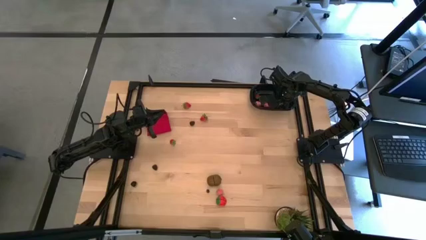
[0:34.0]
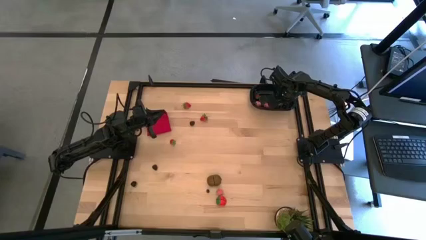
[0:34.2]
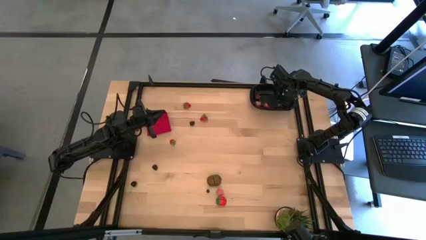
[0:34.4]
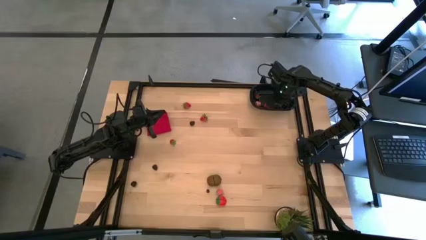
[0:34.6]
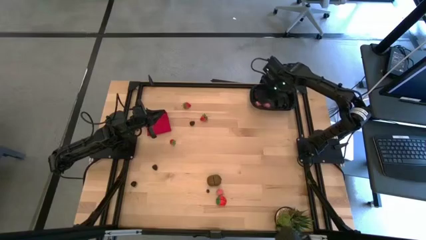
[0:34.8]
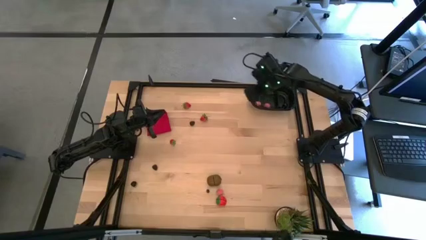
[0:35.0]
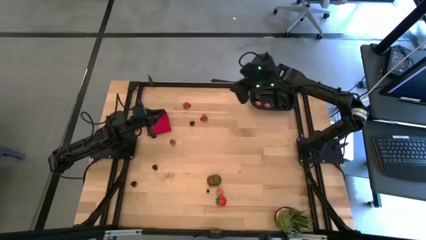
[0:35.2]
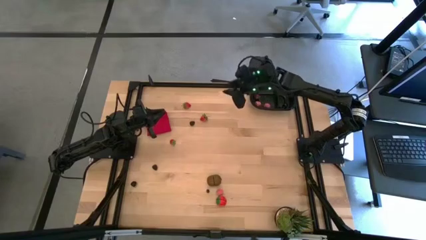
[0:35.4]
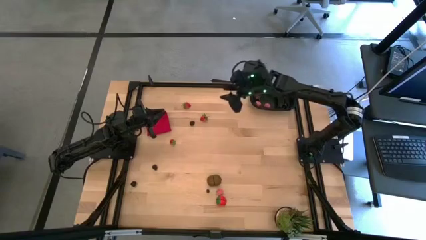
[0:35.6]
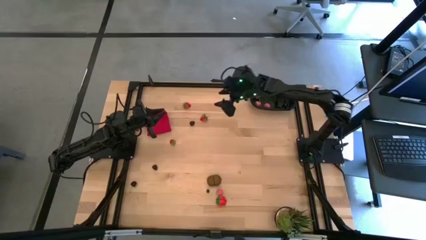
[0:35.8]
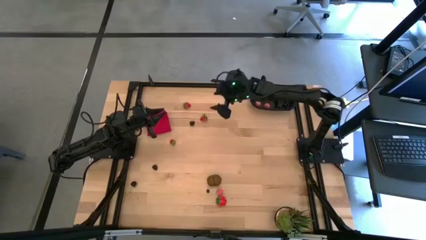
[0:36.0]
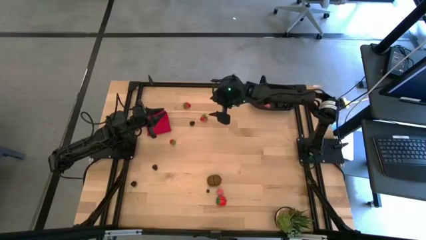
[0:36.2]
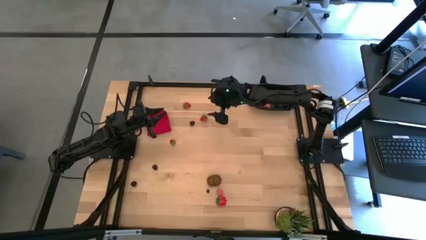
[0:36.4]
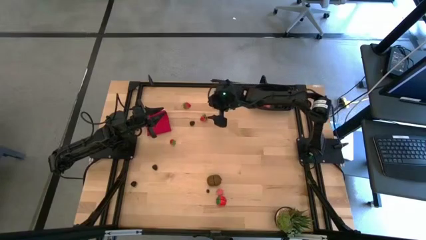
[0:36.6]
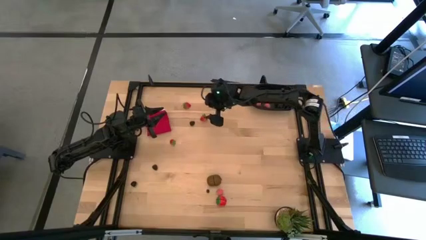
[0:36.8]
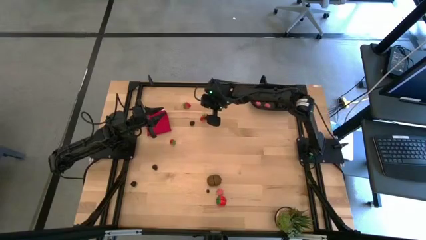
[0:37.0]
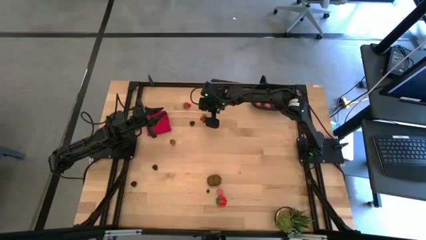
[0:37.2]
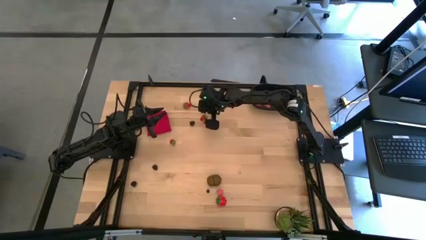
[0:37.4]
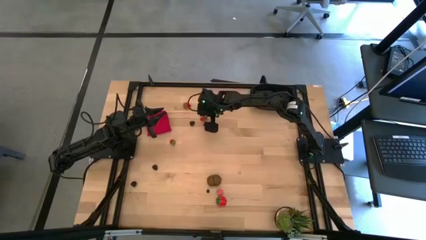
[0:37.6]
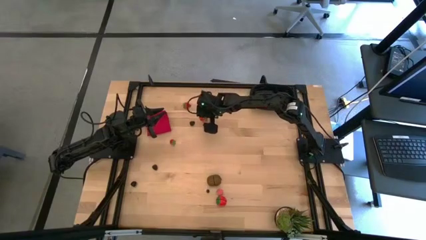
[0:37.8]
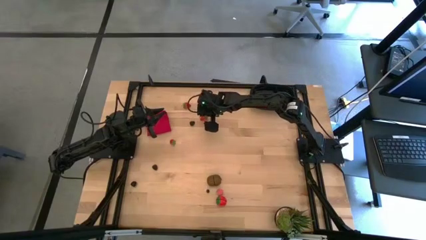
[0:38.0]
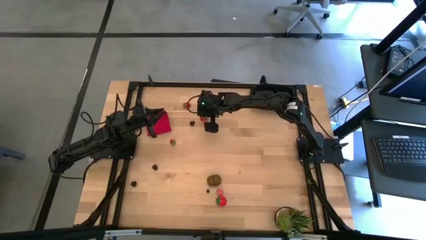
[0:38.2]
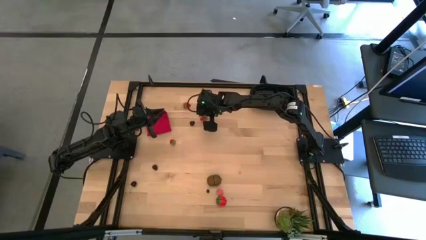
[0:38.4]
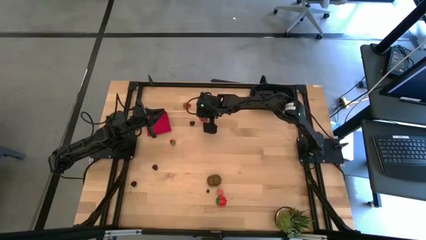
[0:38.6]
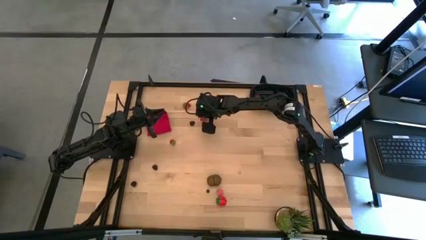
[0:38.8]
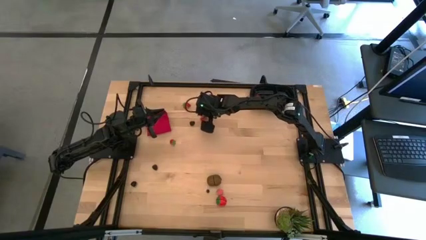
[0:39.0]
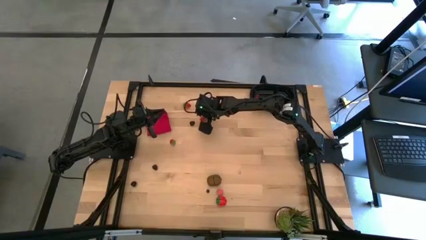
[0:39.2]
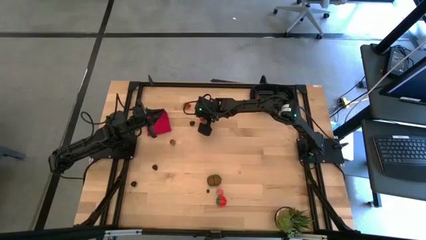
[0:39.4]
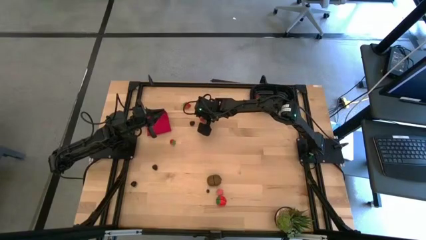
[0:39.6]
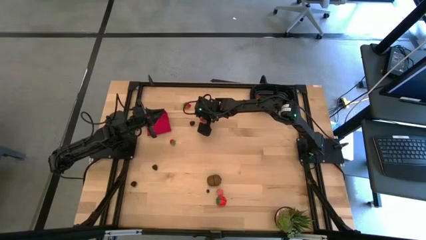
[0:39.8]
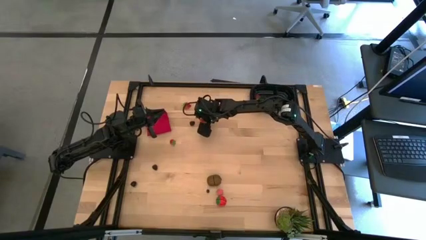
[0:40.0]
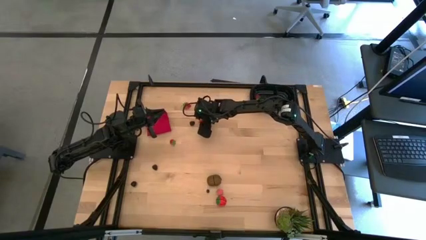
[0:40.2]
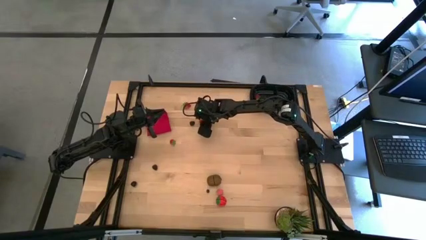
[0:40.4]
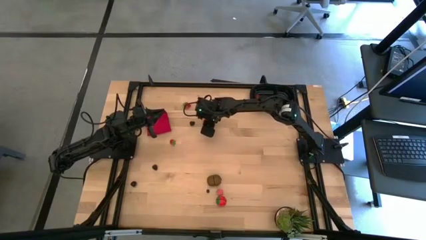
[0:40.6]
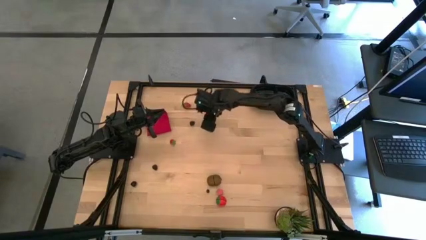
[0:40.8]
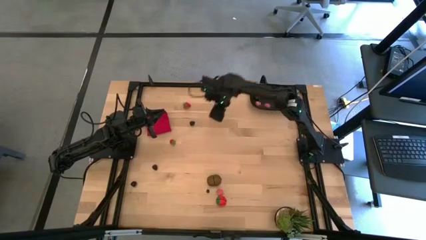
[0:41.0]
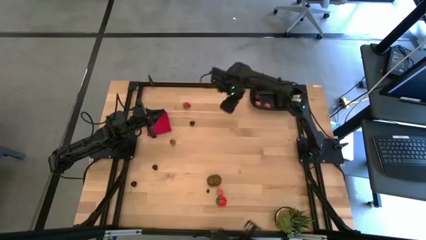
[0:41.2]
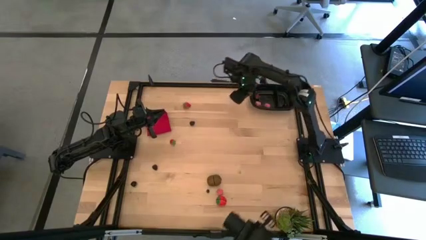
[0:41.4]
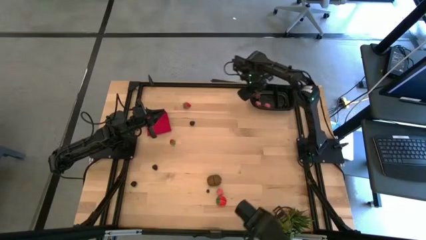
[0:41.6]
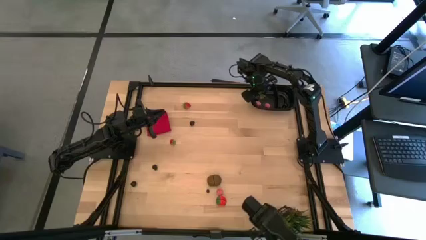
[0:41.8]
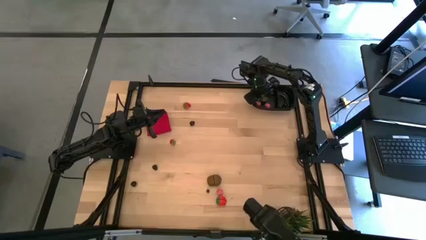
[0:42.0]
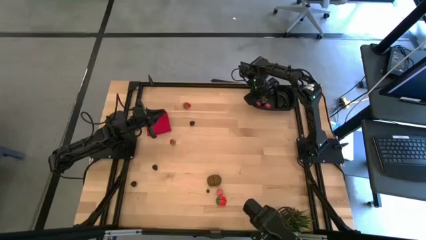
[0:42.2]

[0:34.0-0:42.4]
Task: Pick and placing Produce into tupperware
Put the red strawberry into the black bin

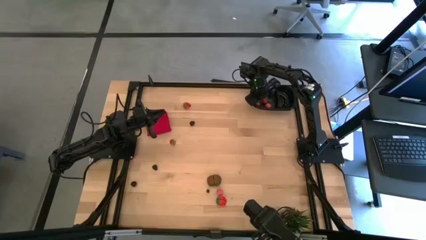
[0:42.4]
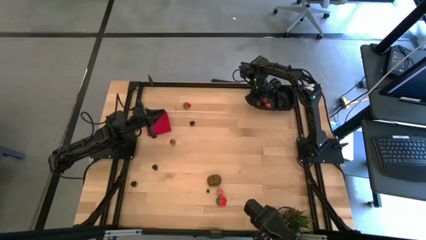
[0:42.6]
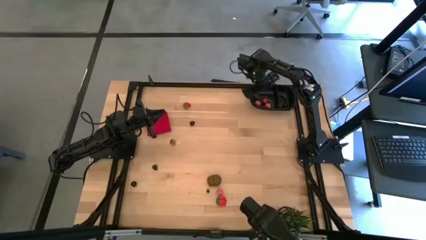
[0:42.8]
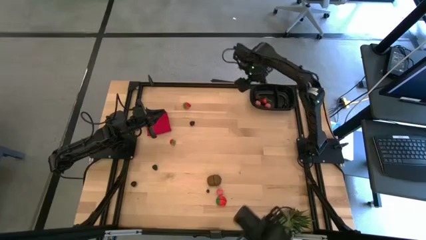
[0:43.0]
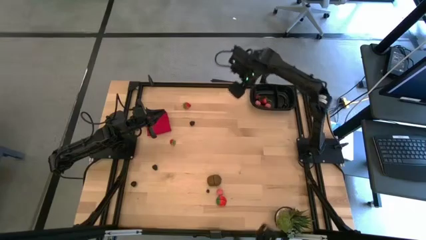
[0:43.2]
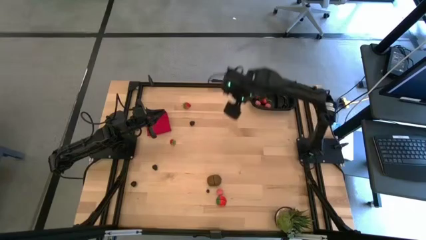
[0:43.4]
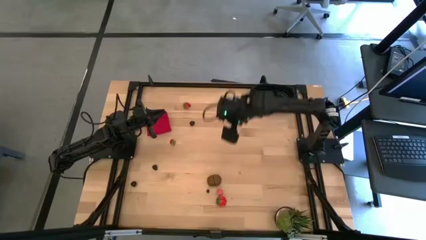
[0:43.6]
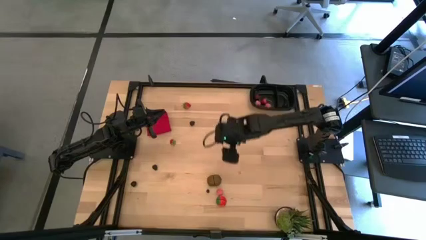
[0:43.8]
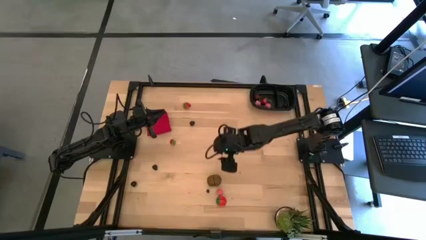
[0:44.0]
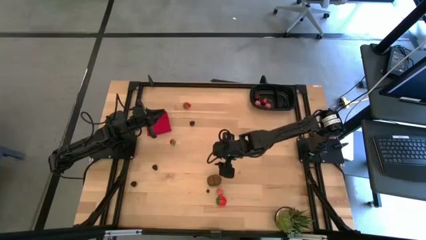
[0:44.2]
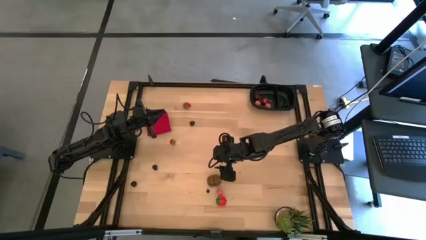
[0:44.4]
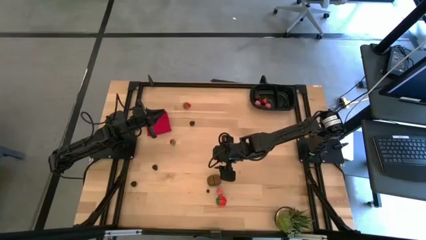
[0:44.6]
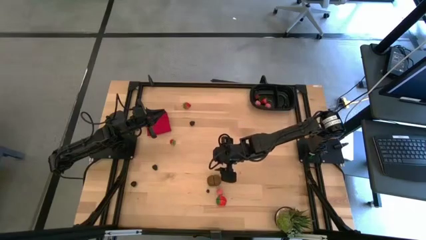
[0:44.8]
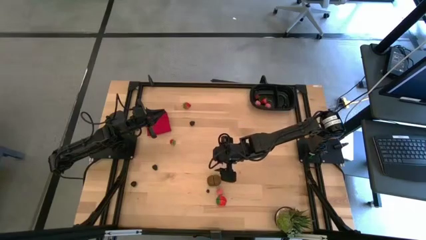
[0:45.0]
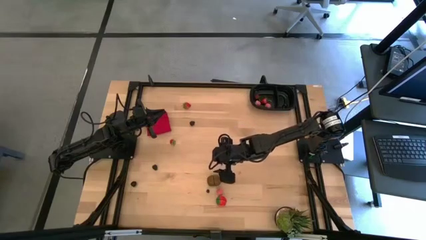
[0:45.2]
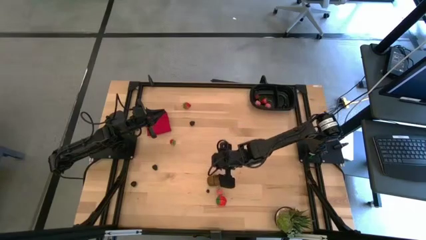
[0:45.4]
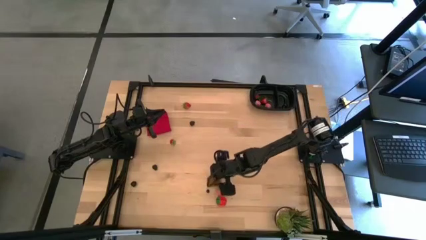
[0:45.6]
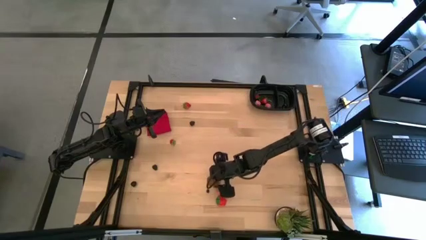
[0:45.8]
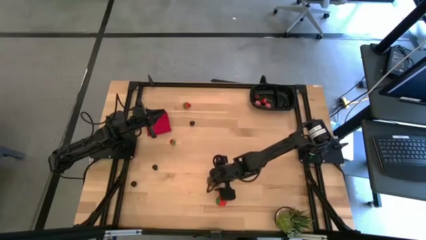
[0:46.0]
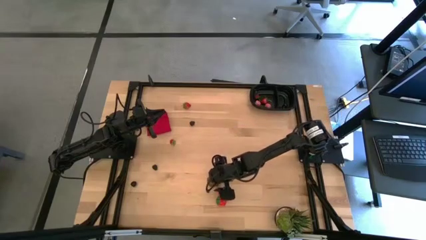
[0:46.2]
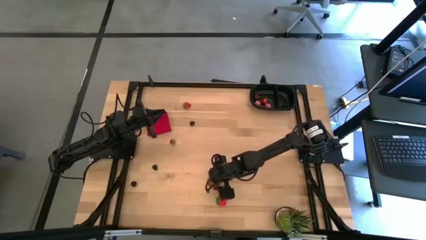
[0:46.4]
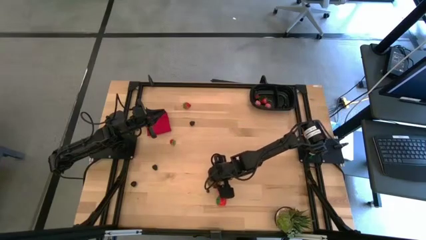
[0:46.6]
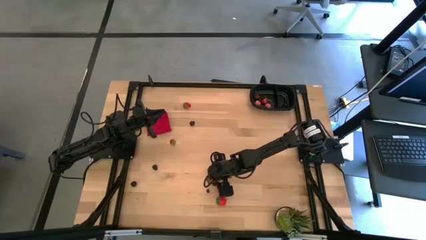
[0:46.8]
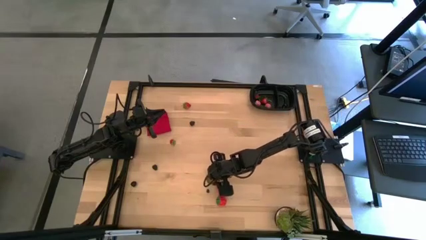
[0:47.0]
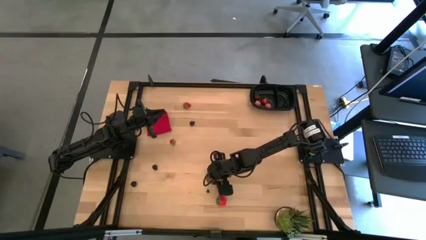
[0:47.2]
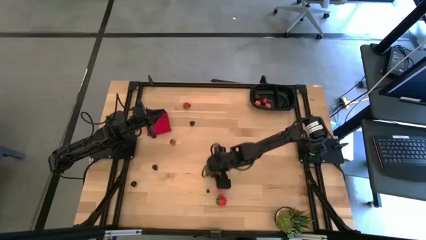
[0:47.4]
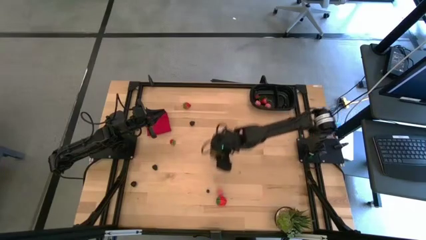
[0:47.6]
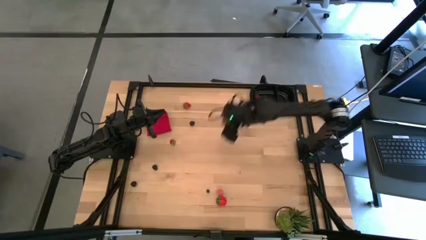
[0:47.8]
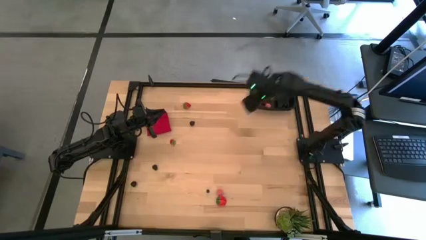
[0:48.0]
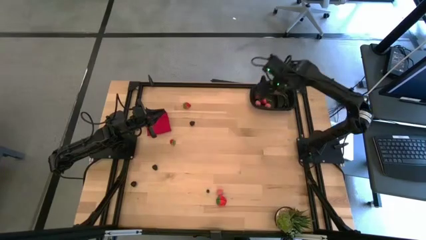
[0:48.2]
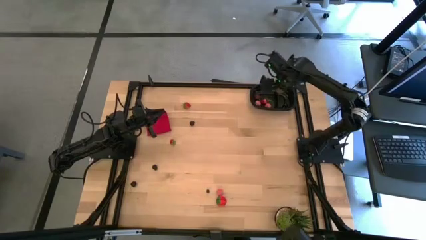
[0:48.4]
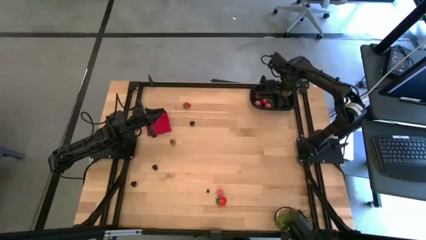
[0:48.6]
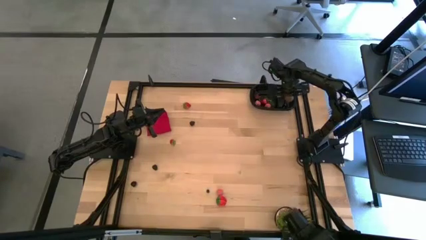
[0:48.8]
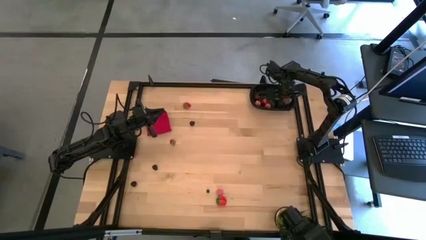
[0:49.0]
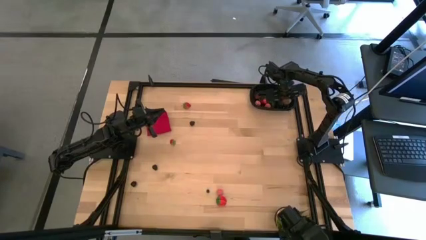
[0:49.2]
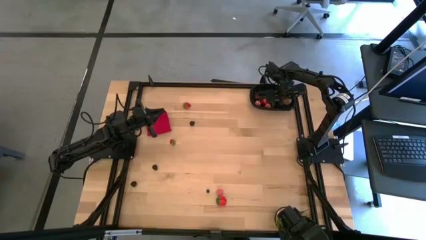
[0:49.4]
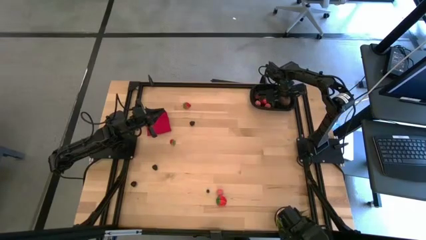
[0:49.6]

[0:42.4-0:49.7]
Put the brown kiwi into the black bin
